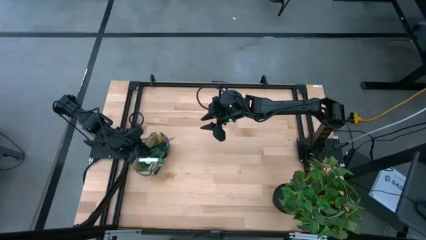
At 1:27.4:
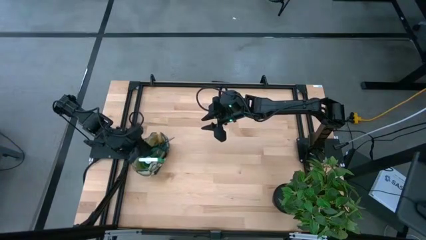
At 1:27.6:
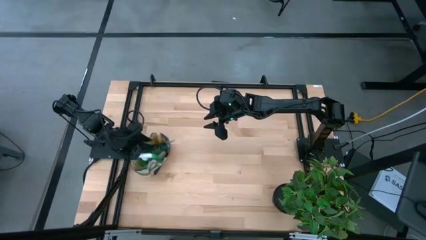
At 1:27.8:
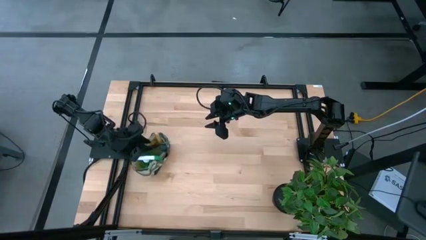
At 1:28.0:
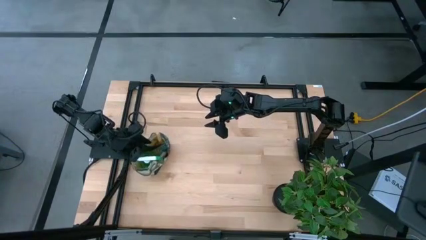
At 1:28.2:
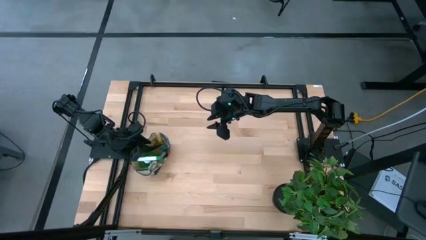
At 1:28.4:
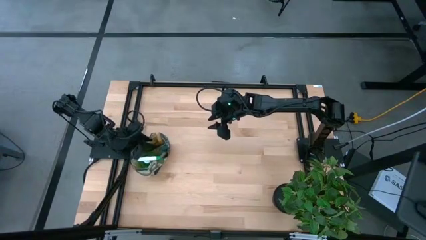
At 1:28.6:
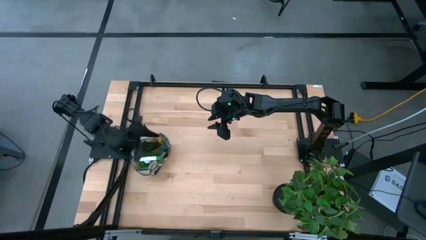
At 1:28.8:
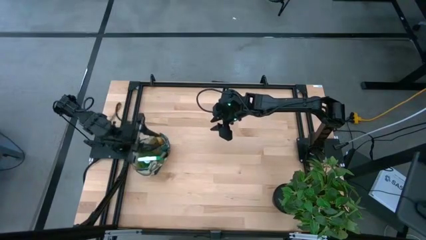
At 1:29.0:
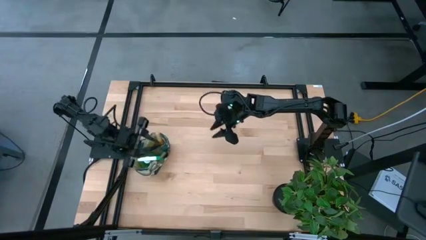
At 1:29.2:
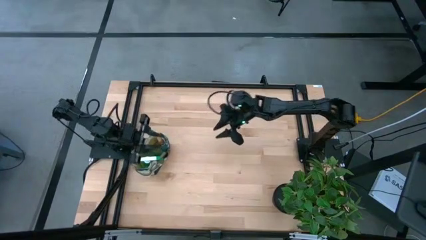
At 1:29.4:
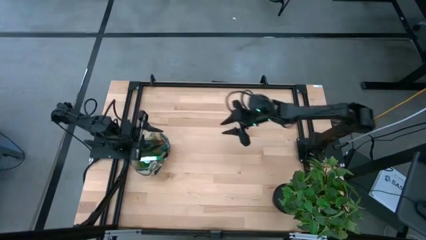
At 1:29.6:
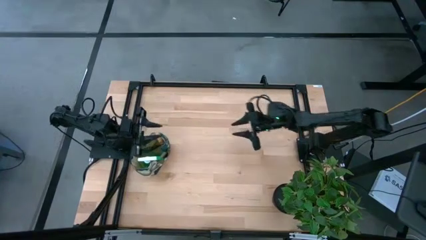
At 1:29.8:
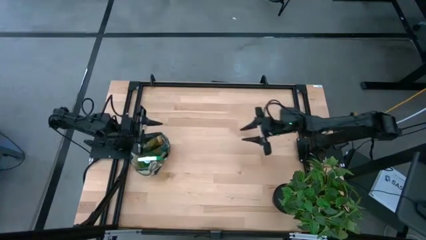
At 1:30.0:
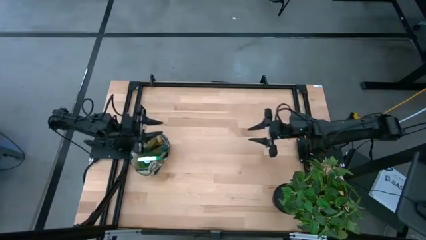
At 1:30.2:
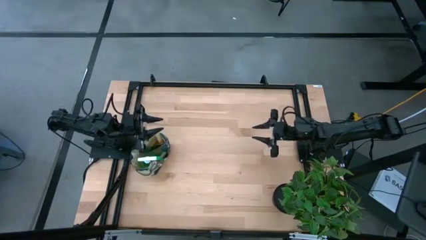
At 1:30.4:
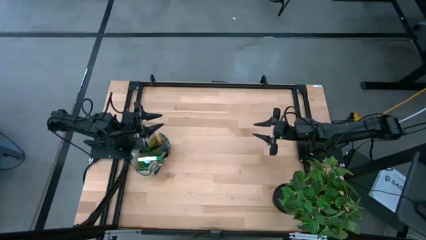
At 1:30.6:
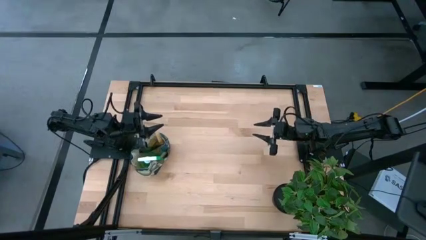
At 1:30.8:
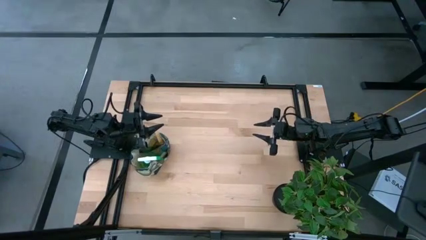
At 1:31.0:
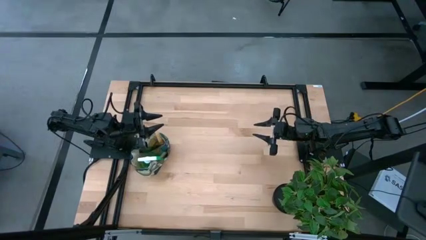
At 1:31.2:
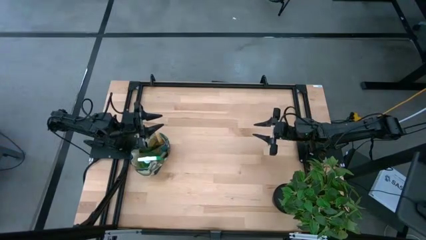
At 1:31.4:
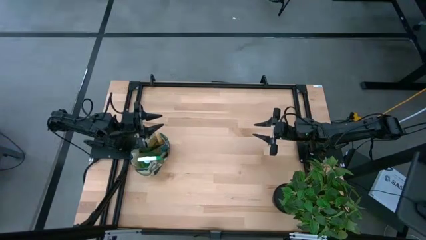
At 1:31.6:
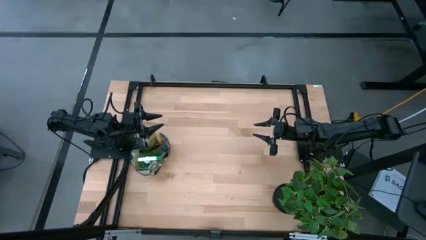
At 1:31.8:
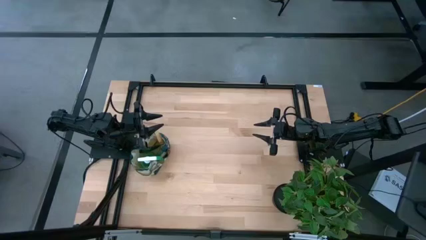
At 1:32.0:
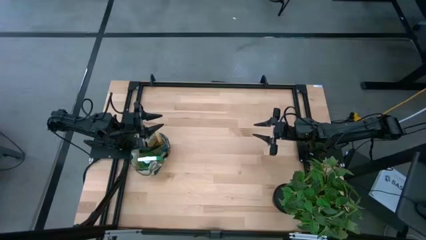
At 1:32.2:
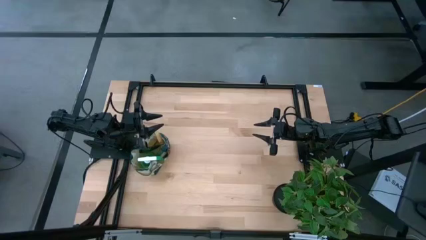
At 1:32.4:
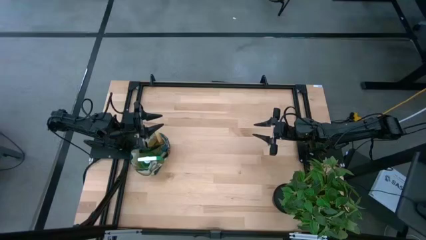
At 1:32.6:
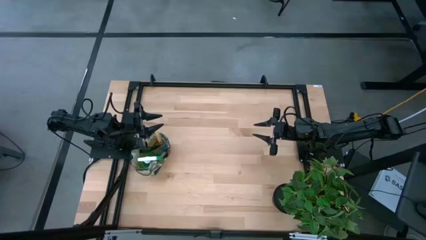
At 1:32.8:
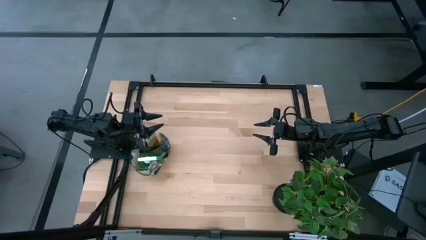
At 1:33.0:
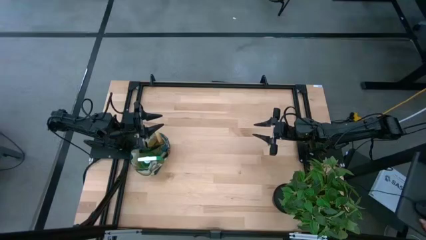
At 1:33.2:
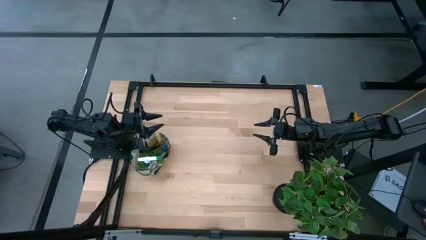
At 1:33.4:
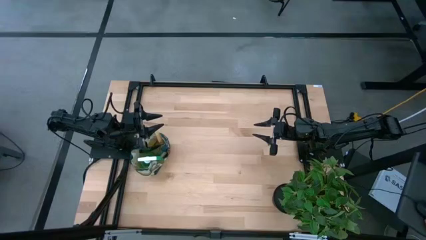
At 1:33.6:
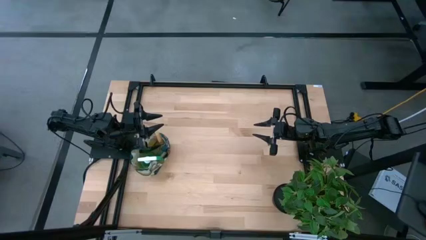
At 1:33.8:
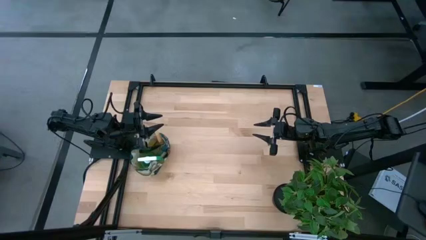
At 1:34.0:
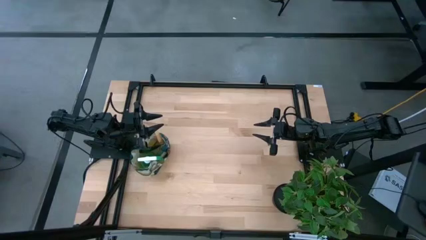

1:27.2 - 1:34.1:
Task: Pick & Place Garden tools in Gardening bag
Return to Home Position

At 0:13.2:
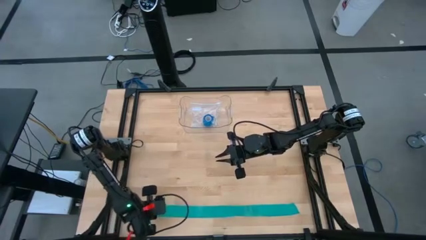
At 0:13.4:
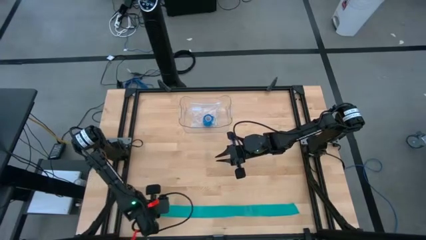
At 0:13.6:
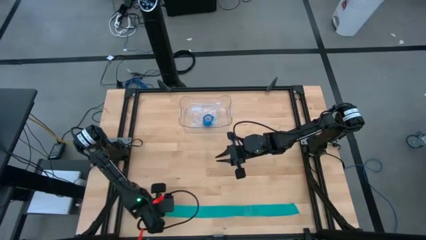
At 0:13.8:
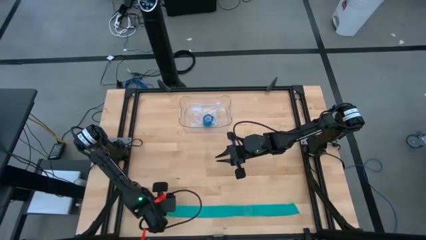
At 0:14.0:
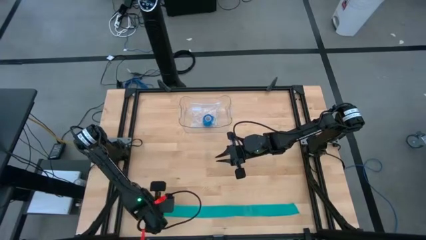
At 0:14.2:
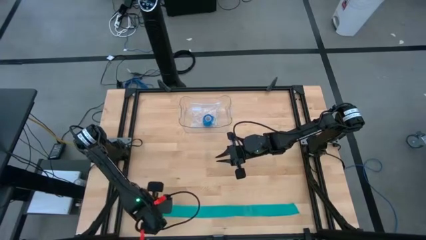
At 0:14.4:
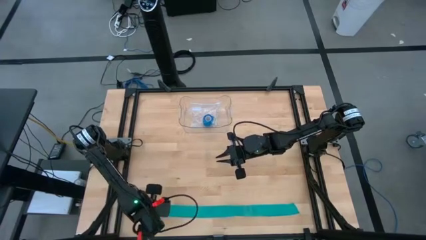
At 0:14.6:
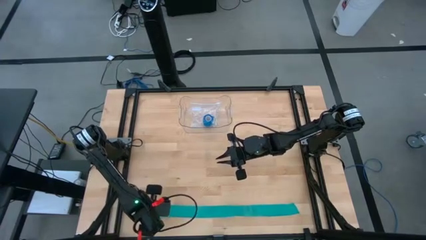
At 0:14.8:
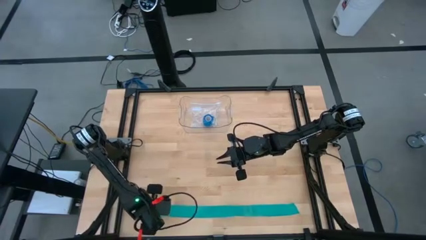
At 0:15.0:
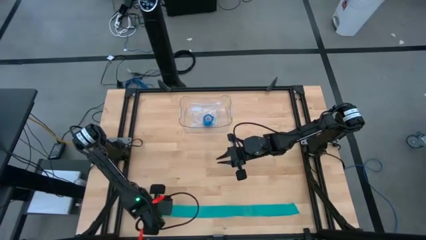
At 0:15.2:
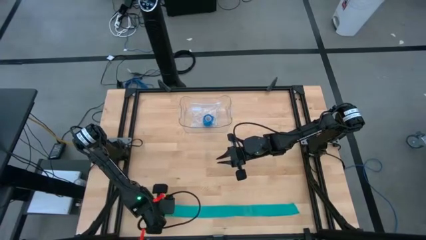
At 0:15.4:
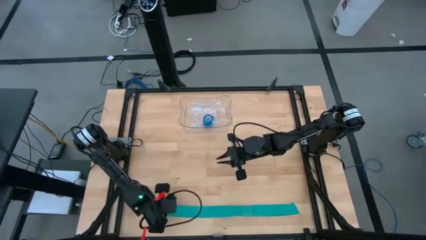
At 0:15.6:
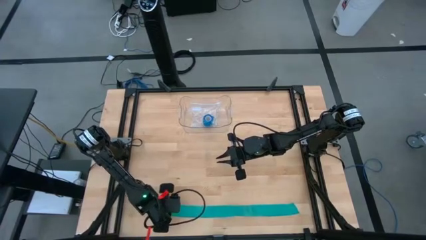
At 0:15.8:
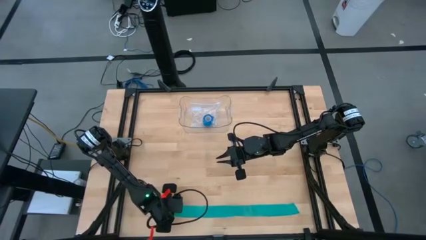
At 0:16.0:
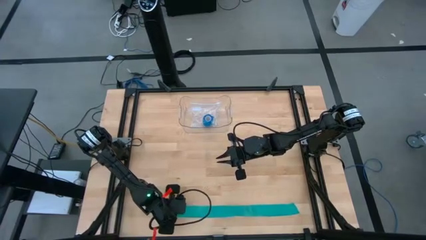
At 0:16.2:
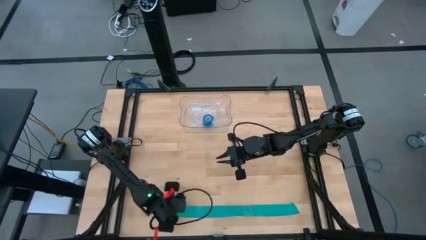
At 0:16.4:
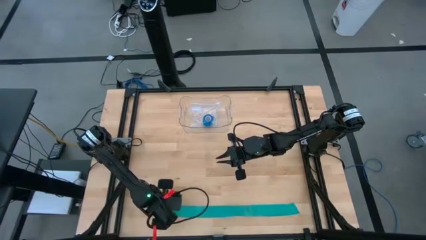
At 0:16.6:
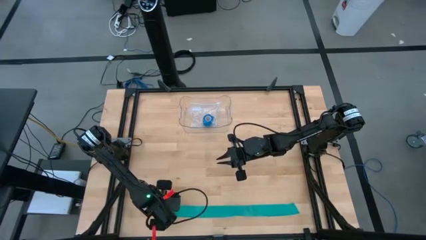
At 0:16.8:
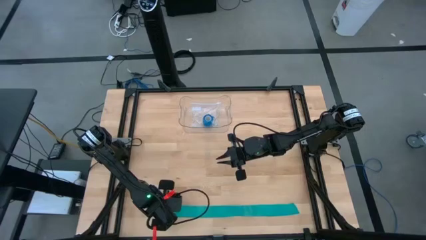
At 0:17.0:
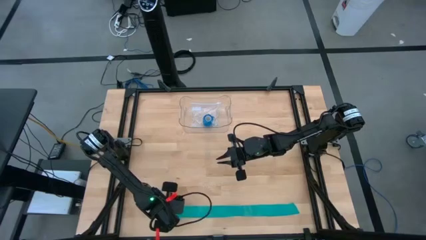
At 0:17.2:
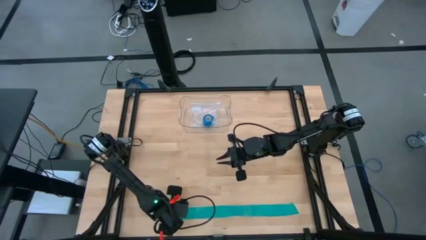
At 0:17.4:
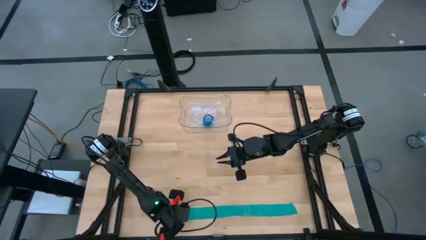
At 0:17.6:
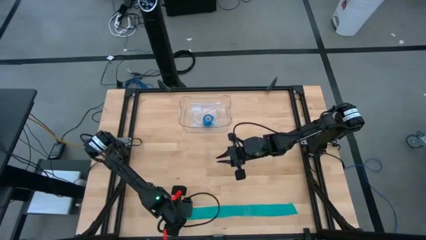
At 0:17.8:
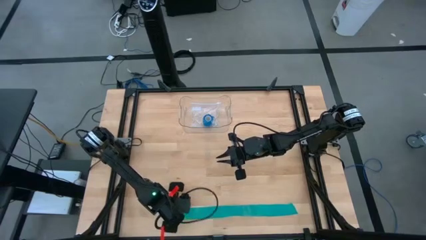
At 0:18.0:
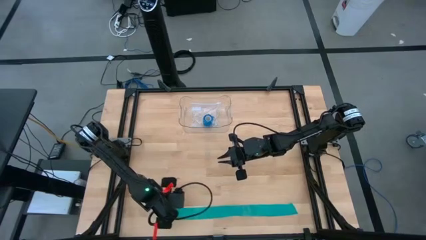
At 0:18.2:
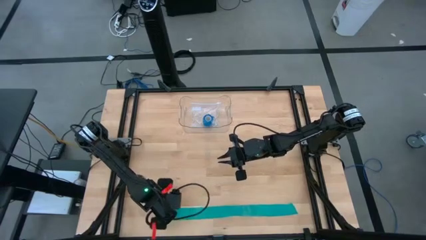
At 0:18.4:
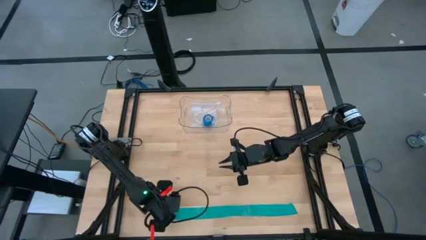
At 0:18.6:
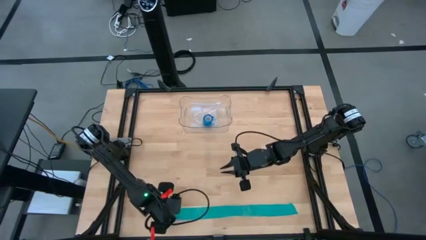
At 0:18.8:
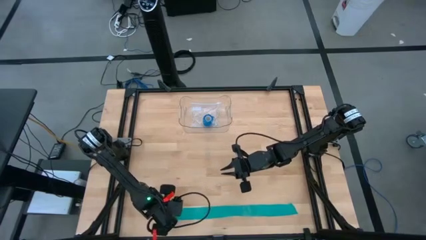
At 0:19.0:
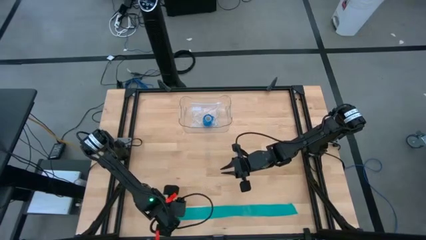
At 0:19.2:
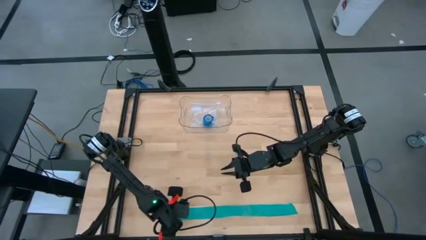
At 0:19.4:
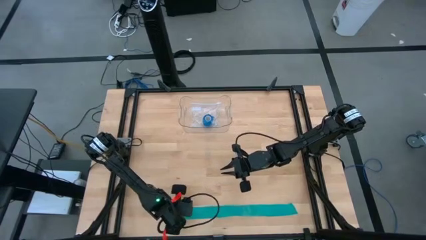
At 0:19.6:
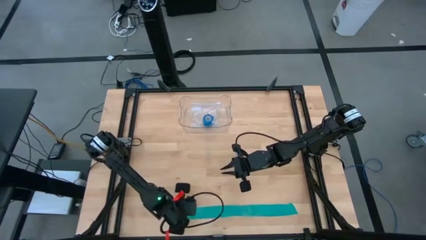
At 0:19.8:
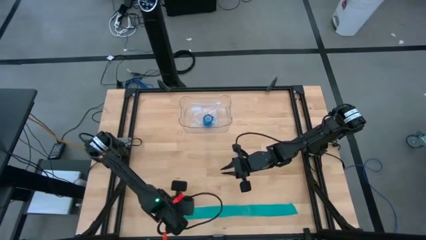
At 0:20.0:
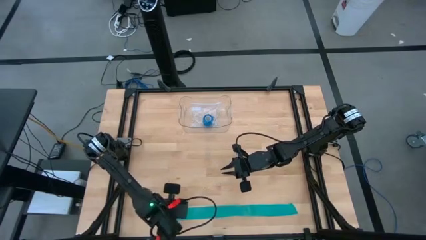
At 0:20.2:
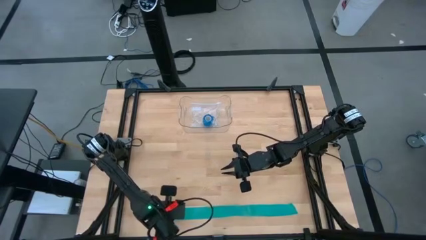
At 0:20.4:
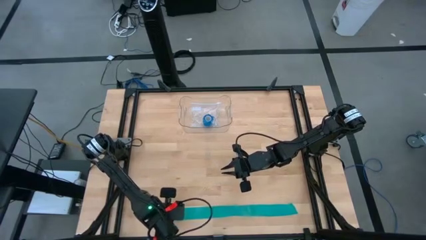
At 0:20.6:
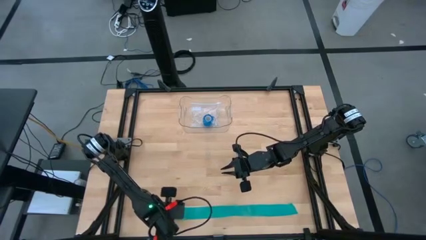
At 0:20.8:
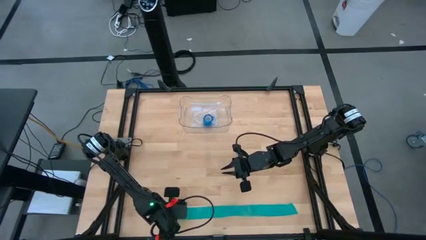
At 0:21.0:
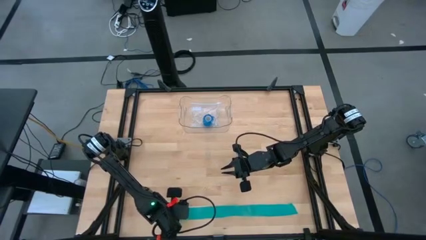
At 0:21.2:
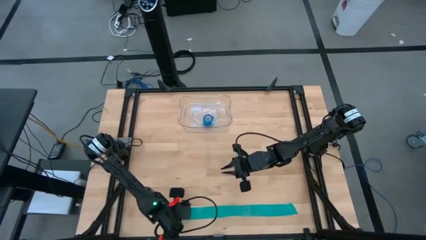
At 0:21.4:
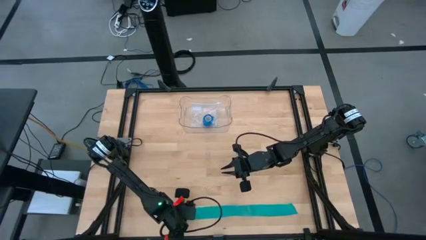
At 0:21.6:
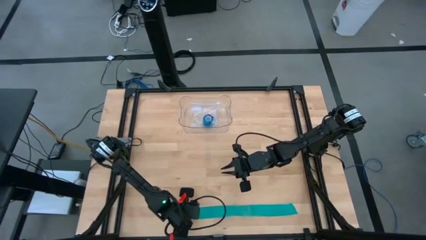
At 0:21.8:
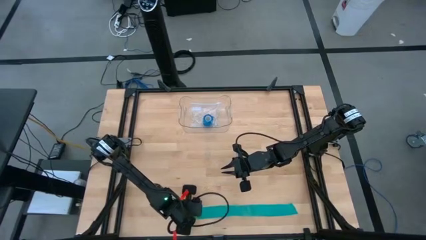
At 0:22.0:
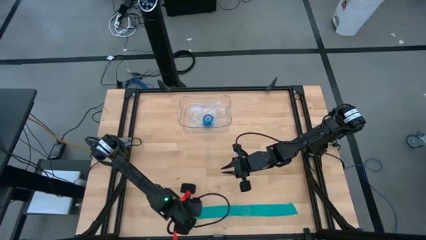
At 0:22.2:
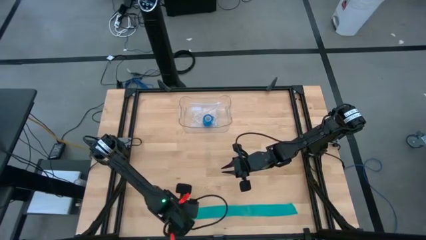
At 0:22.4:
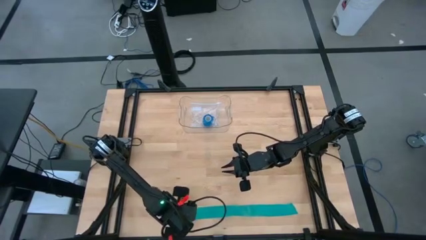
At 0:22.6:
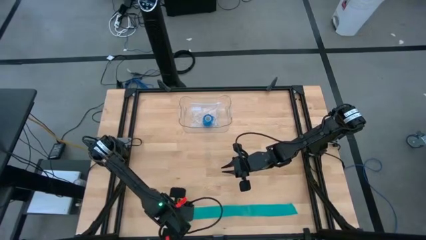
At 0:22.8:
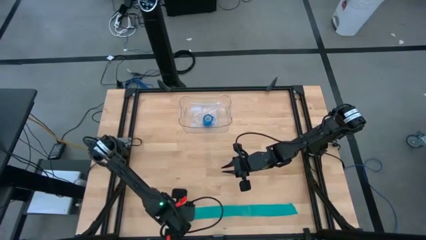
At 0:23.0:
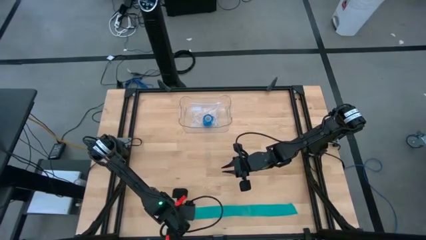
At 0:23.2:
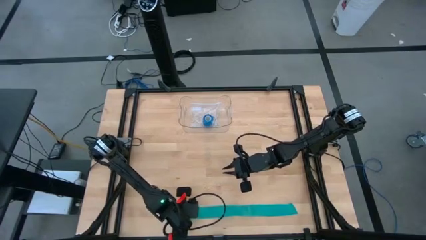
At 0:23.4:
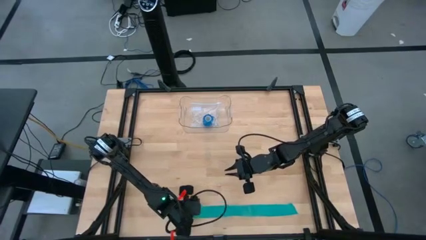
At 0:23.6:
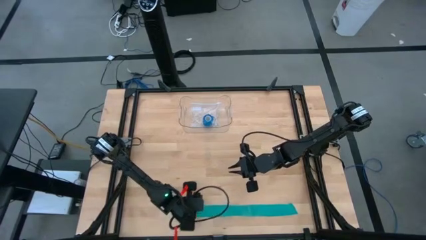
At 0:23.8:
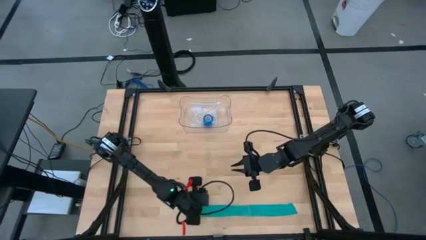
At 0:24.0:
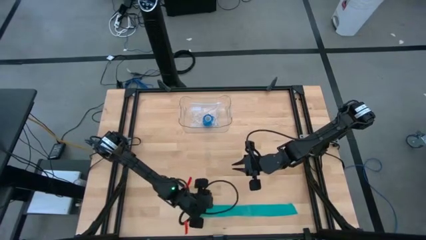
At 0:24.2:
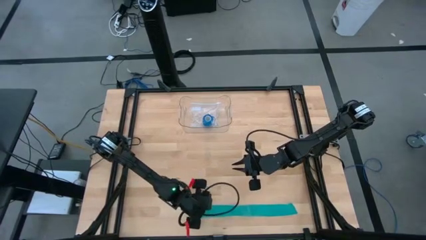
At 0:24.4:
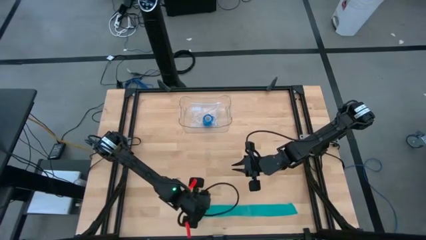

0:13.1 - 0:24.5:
Task: Roll bandage
Roll the green bandage
